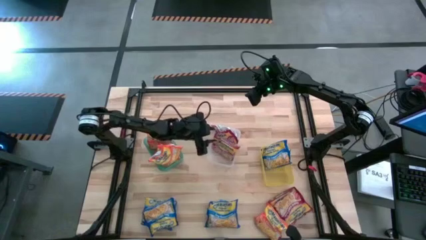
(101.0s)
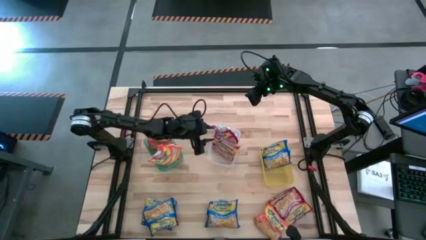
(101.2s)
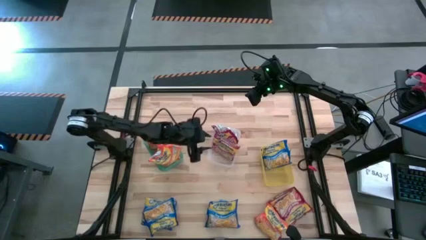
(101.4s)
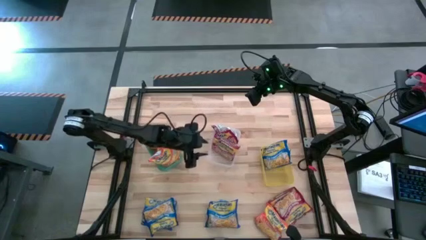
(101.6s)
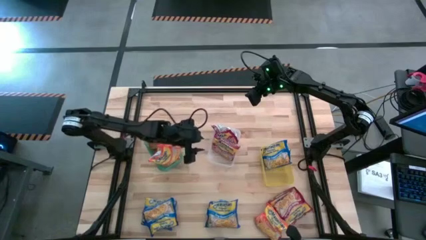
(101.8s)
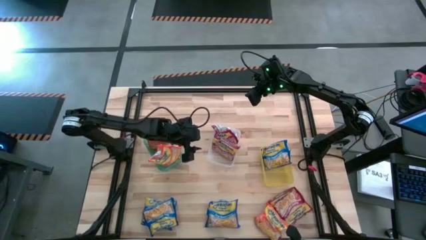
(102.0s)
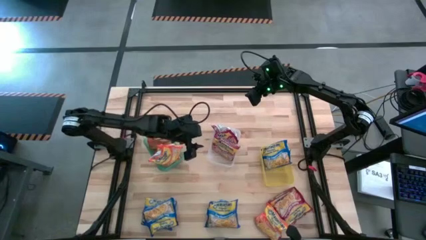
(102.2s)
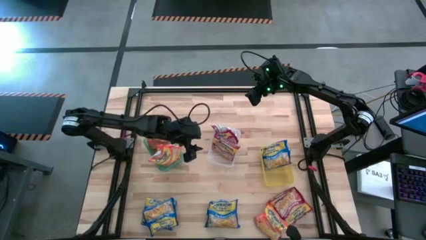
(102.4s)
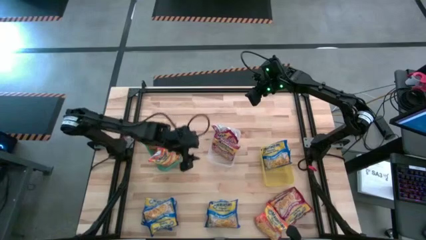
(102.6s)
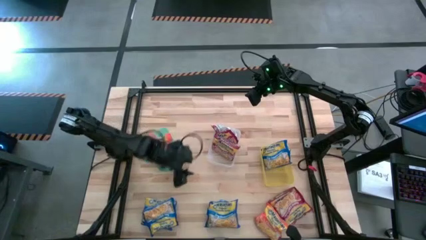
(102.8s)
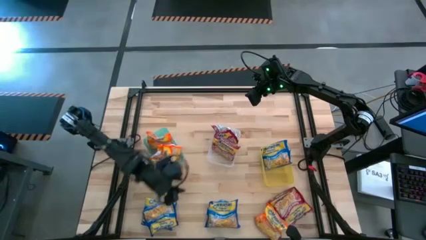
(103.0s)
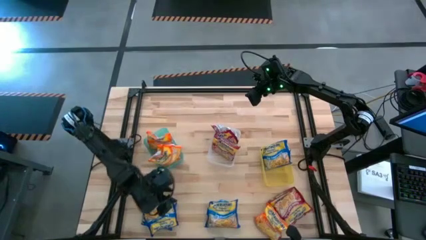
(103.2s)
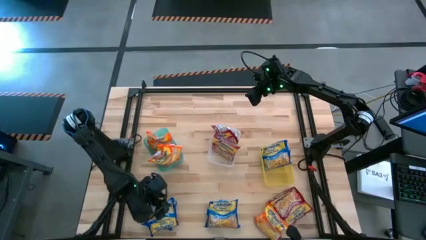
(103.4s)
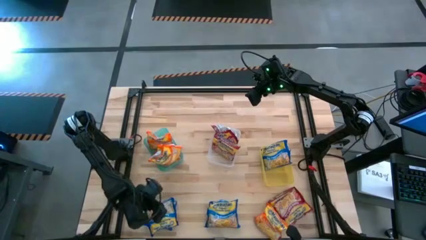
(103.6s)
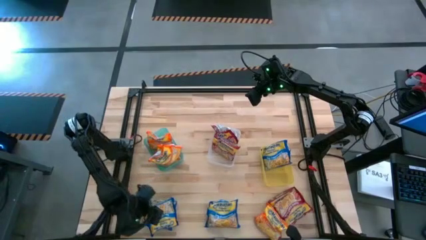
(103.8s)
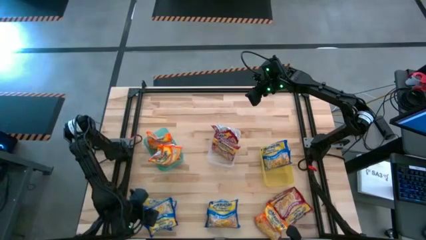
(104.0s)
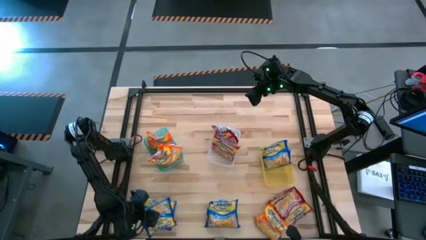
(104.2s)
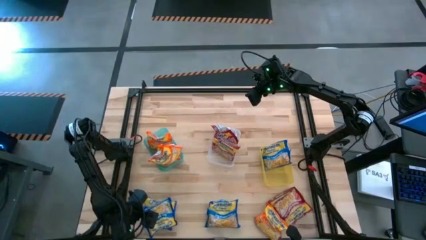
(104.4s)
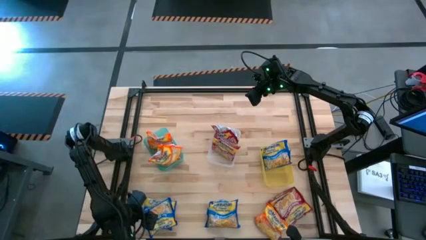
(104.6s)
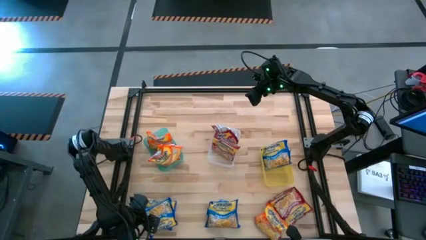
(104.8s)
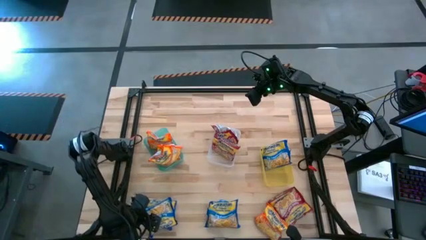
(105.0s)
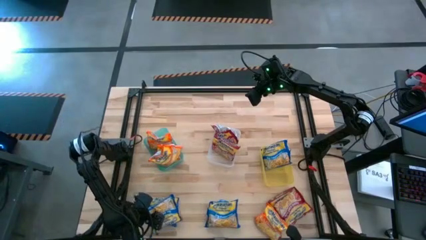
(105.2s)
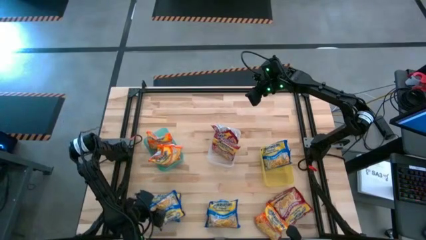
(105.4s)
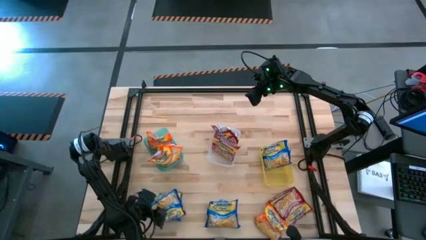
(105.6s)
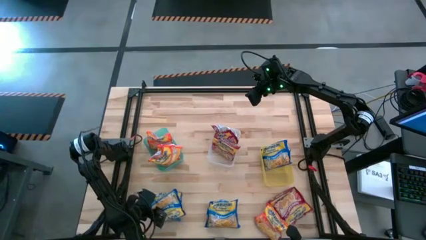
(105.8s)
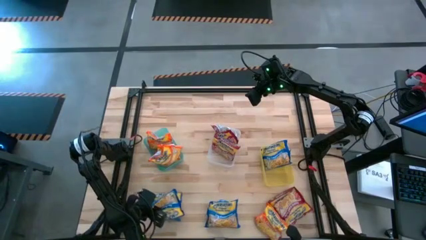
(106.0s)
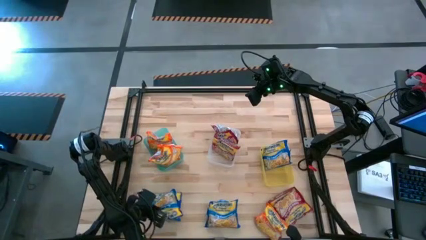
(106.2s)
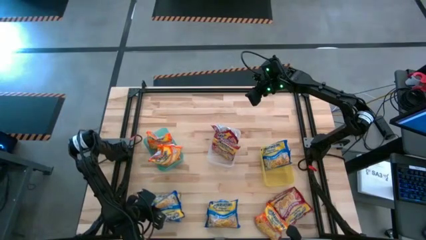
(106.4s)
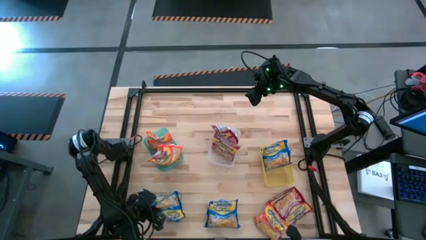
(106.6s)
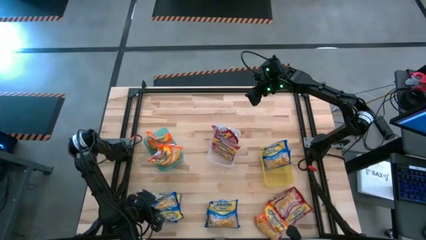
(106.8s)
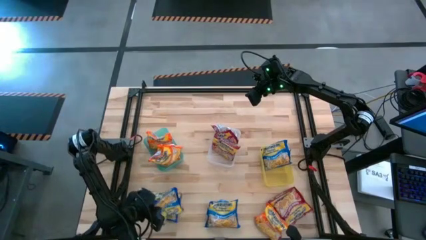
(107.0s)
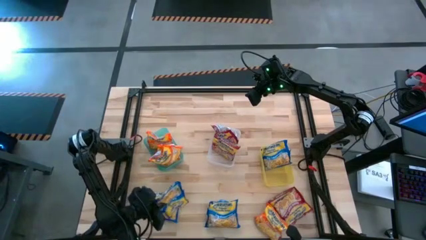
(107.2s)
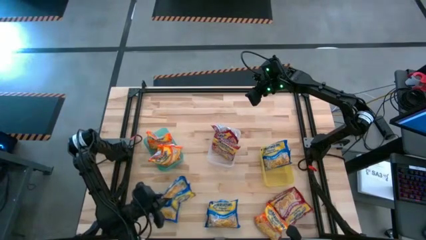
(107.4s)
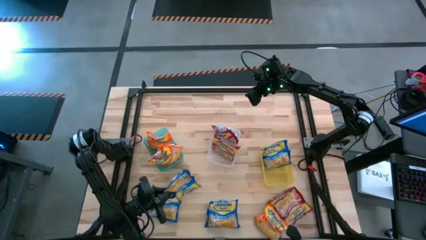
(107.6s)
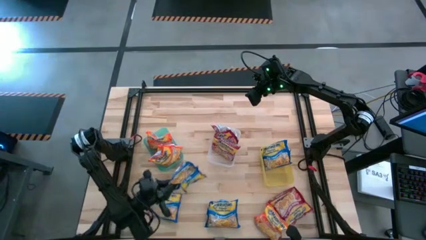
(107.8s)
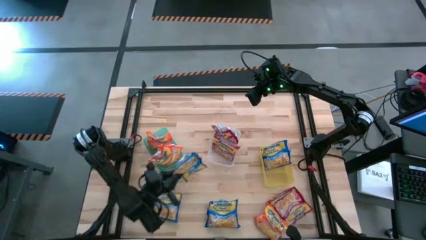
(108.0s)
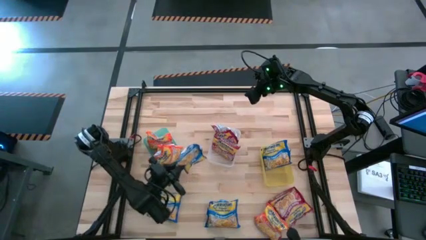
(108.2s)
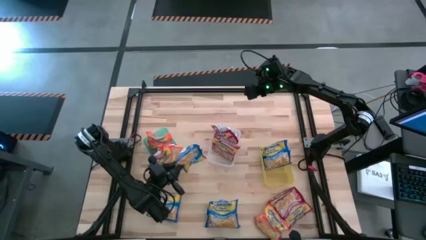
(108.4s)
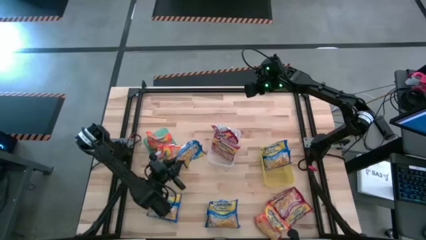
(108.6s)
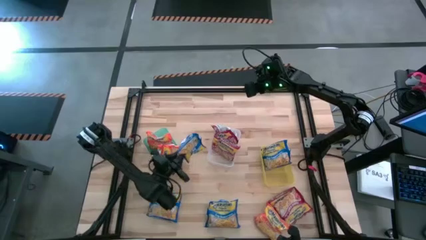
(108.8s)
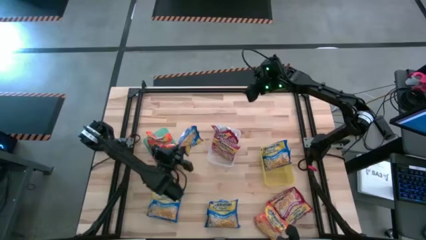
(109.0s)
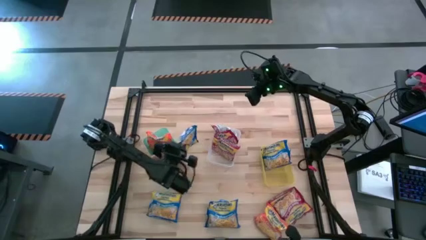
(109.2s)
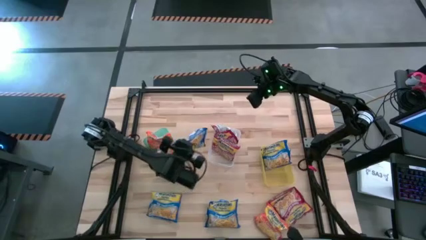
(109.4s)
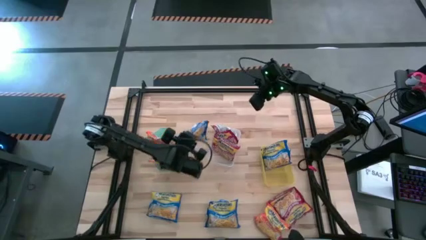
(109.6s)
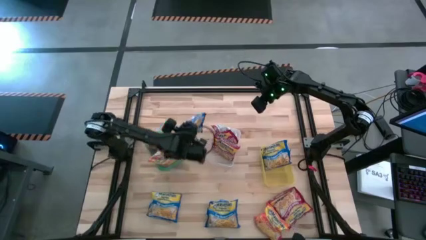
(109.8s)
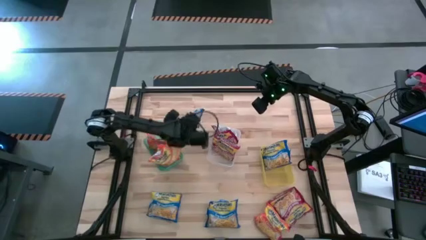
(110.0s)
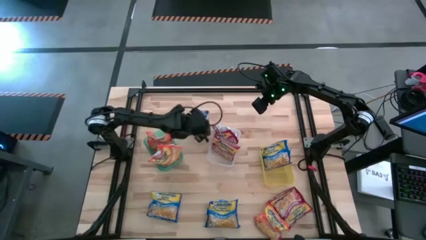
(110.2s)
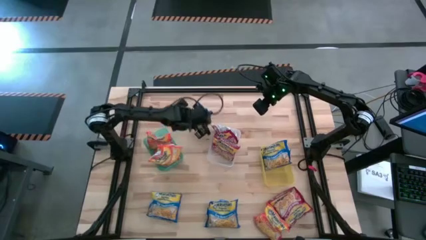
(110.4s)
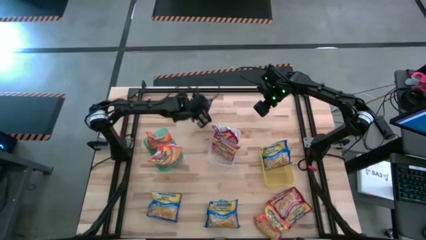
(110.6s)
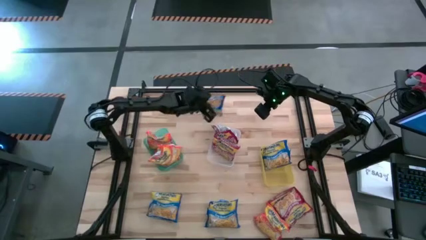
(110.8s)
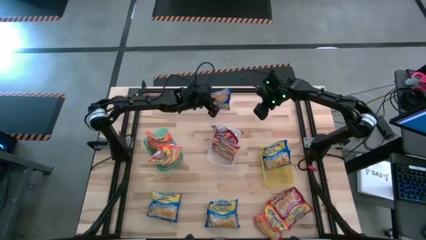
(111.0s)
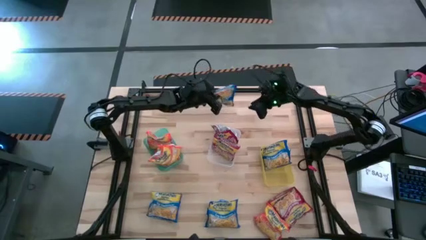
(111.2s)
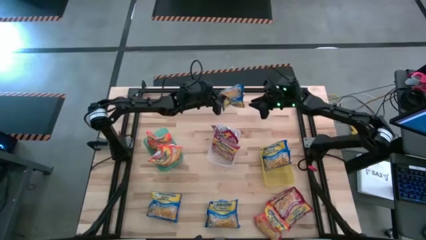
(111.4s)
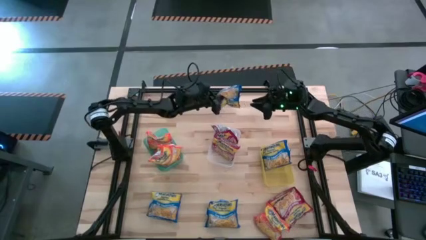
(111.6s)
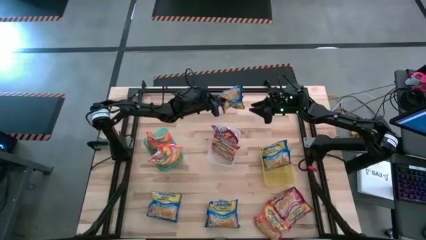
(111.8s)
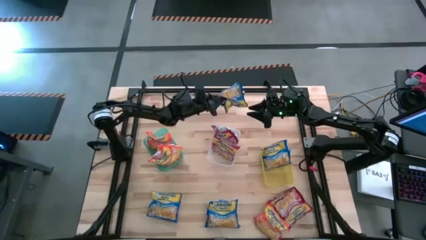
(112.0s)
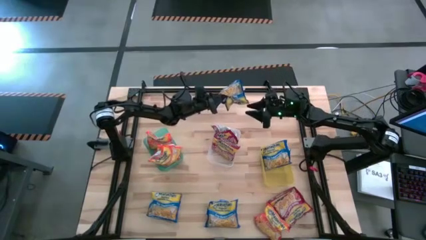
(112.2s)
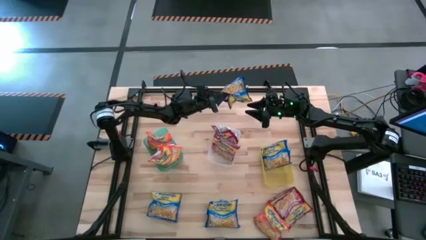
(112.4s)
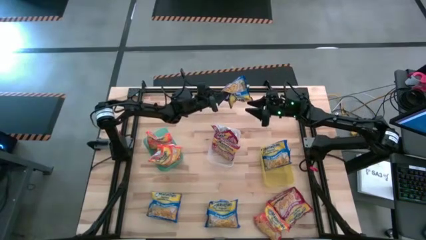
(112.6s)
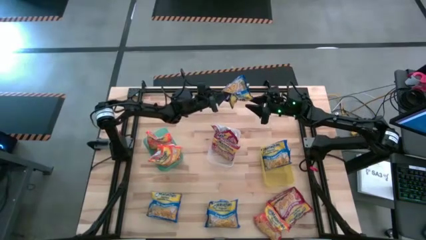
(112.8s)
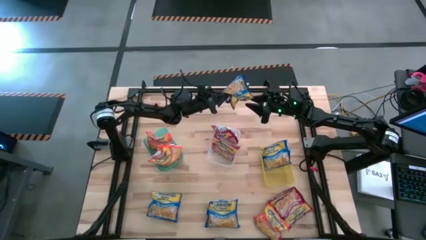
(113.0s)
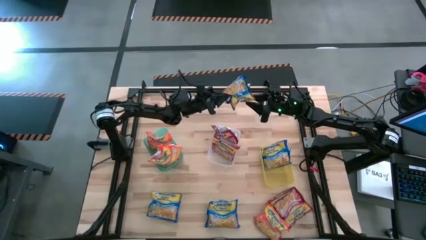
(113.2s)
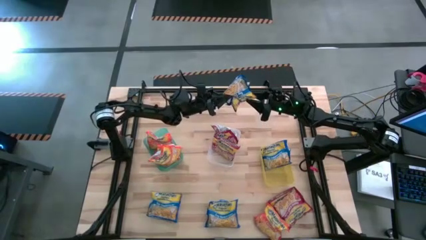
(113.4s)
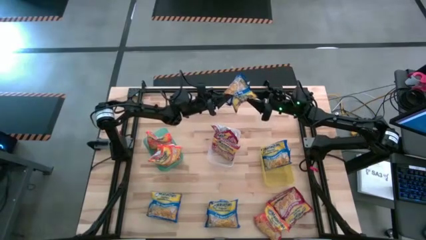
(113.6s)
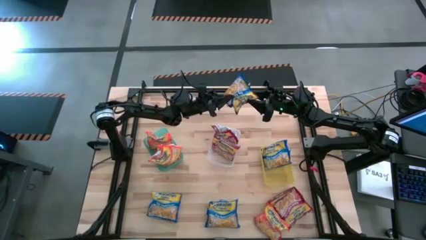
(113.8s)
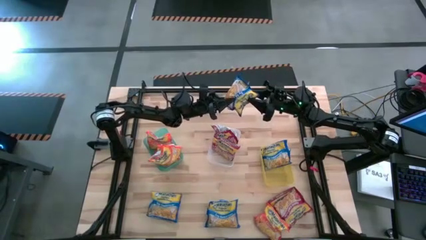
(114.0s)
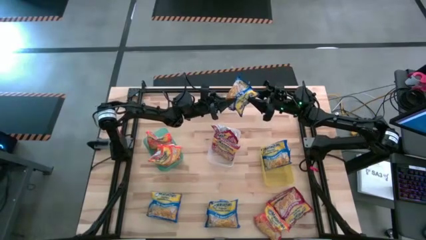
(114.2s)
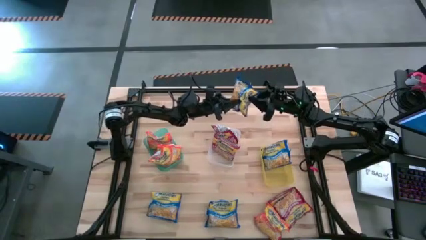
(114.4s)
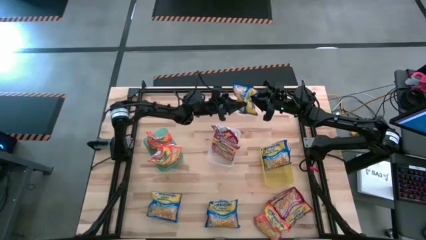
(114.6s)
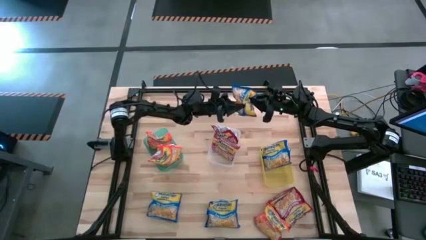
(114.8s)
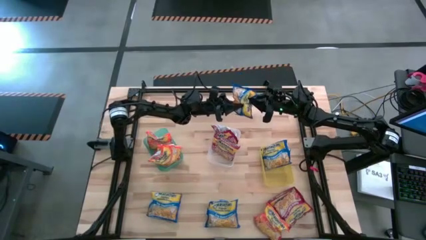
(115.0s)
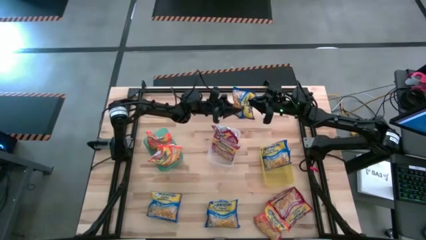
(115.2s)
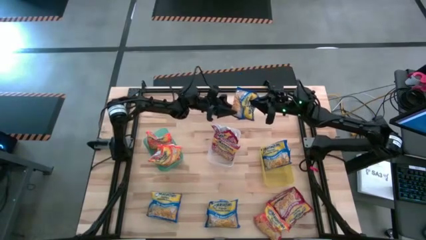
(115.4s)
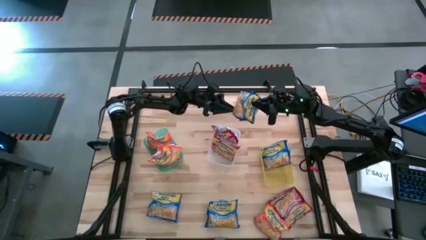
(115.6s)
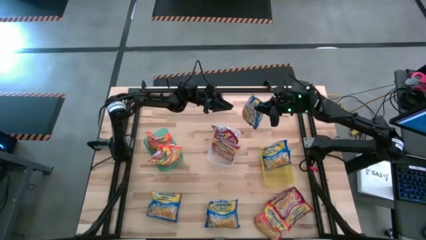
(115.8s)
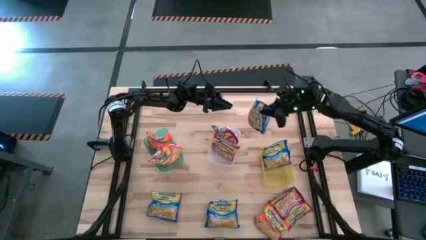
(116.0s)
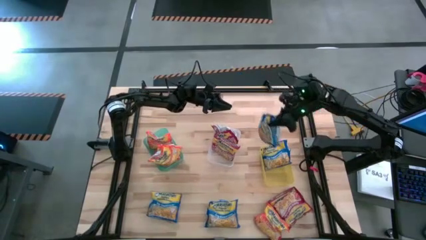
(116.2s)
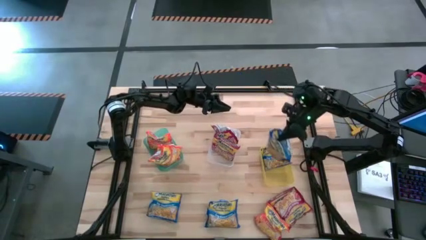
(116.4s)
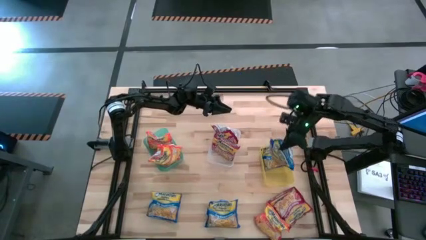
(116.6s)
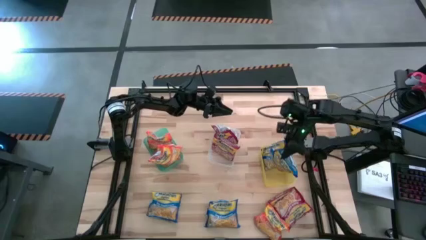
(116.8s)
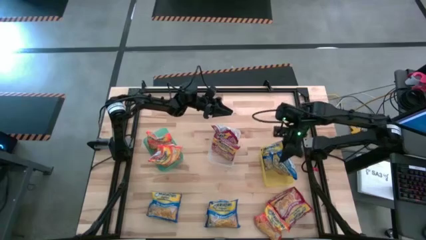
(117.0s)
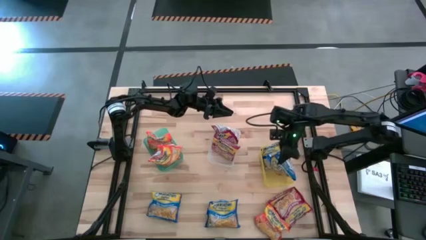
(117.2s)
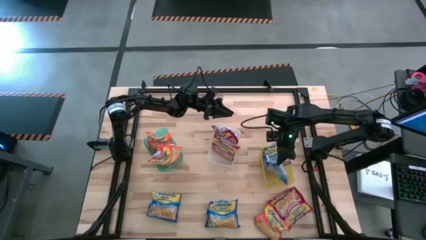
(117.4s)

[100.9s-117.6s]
Task: Sort Maruchan noodles
Put the blue noodle pack into the yellow bin

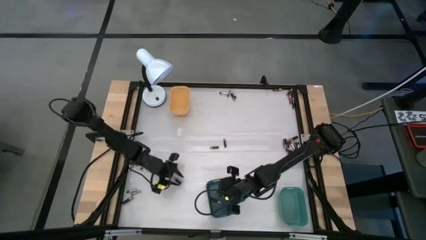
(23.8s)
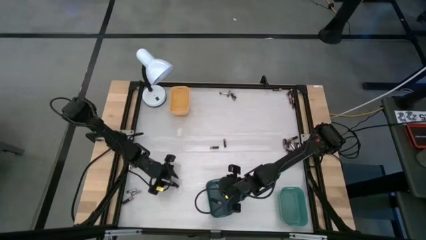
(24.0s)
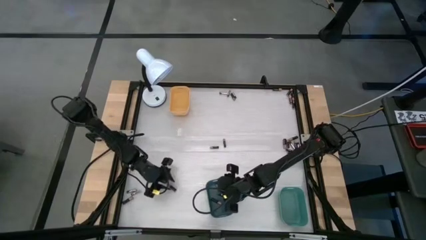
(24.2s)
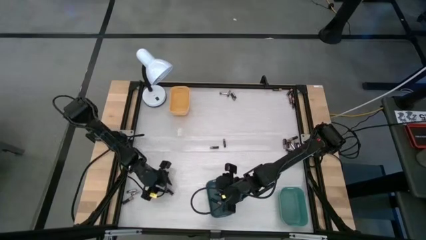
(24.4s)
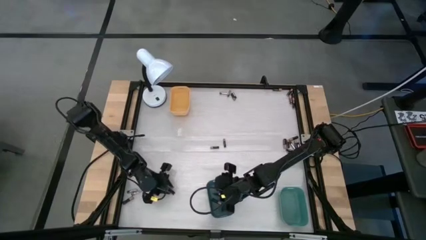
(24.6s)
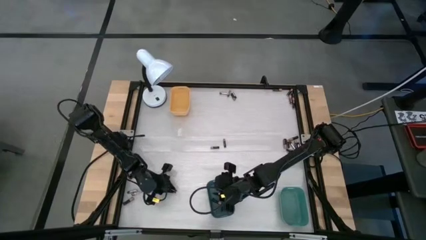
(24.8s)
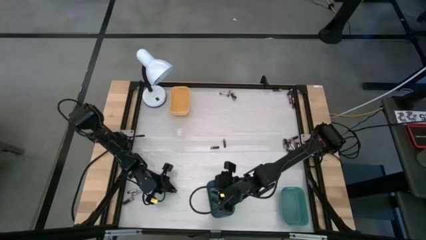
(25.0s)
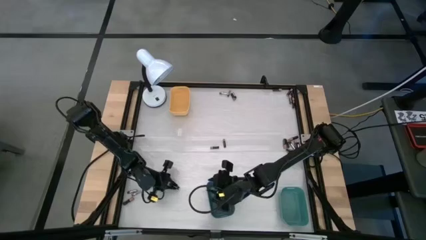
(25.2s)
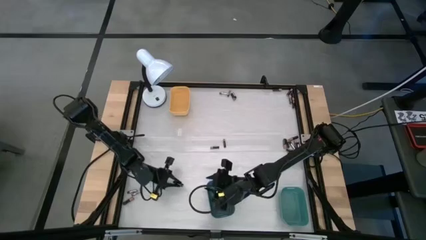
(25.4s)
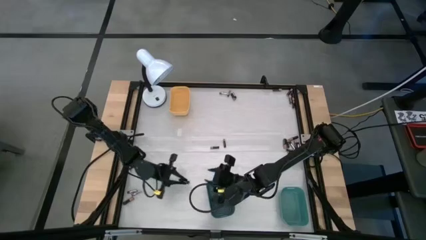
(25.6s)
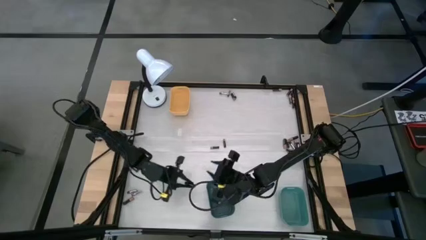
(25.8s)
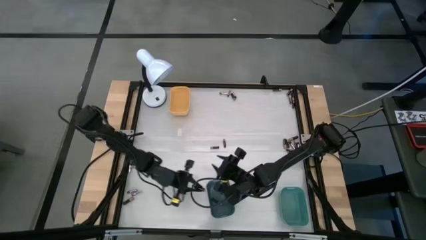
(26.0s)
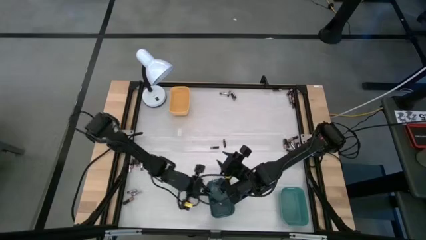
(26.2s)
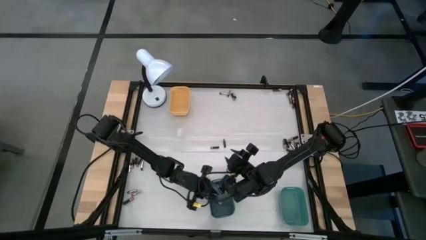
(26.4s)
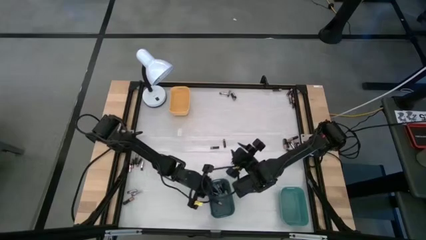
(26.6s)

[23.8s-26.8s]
Task: Sort batteries
Put the black battery into the blue bin
